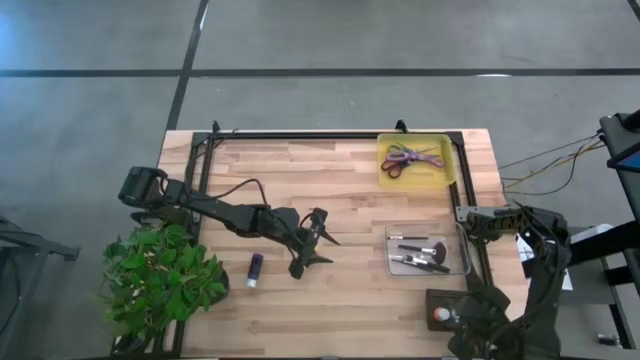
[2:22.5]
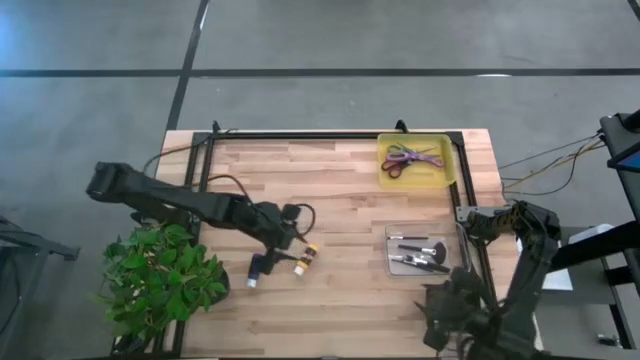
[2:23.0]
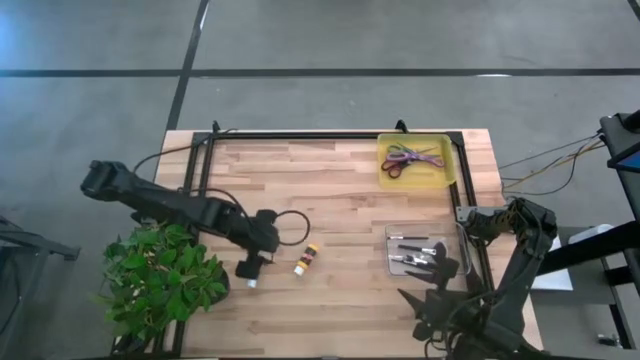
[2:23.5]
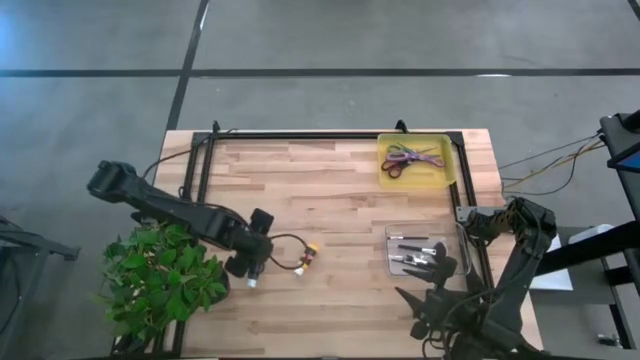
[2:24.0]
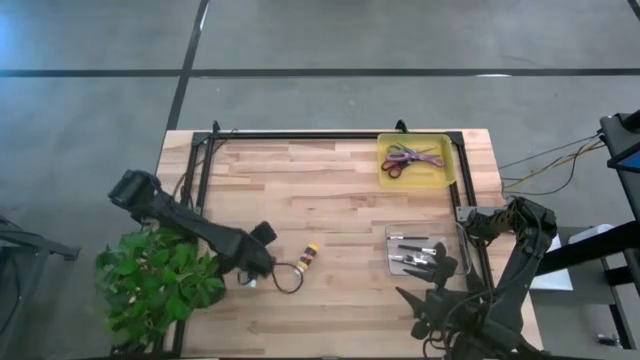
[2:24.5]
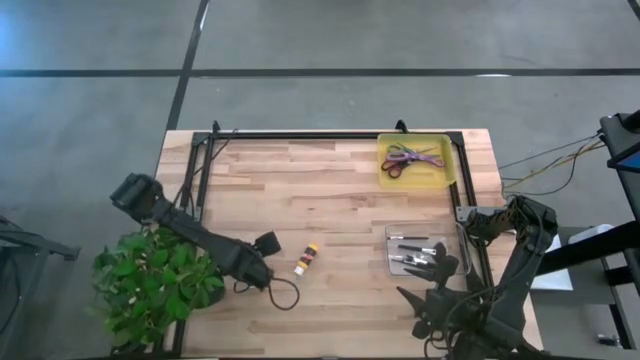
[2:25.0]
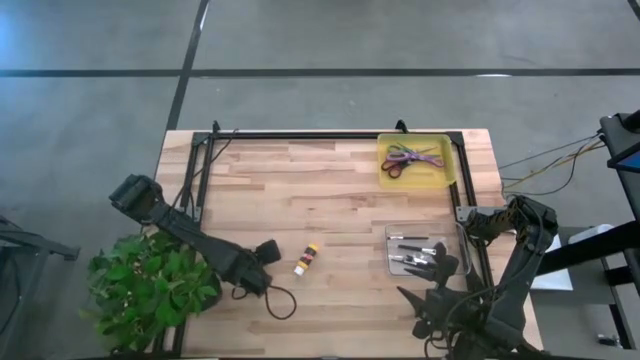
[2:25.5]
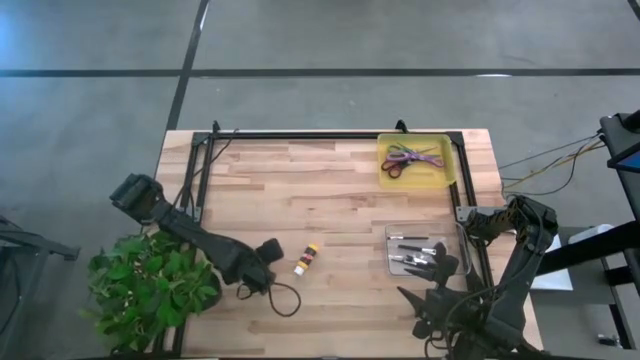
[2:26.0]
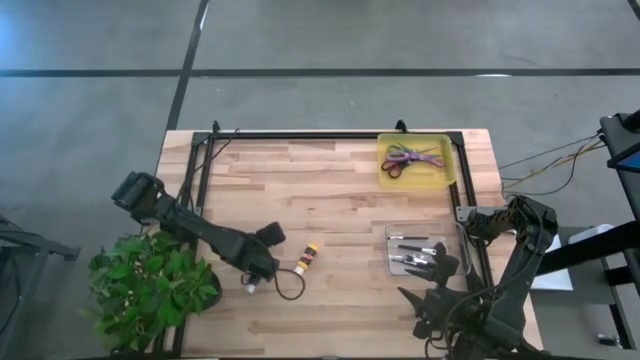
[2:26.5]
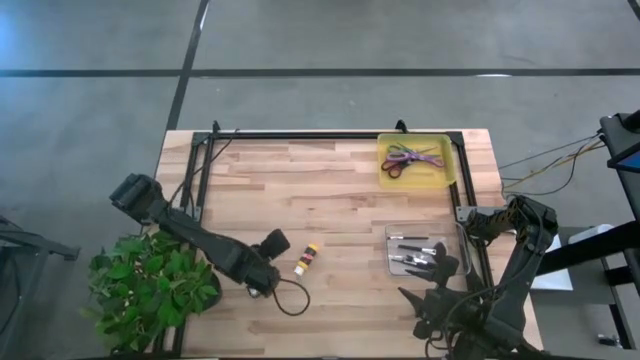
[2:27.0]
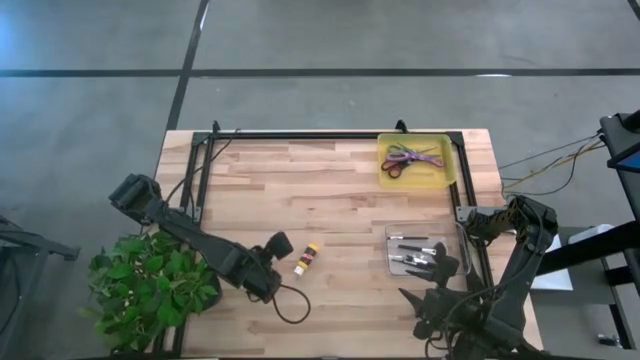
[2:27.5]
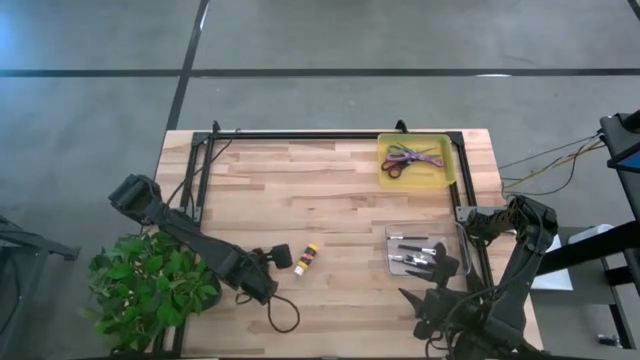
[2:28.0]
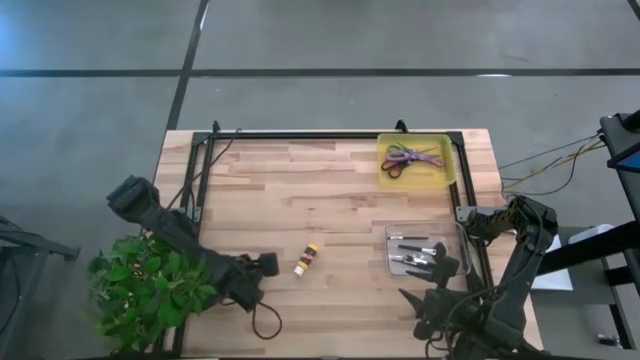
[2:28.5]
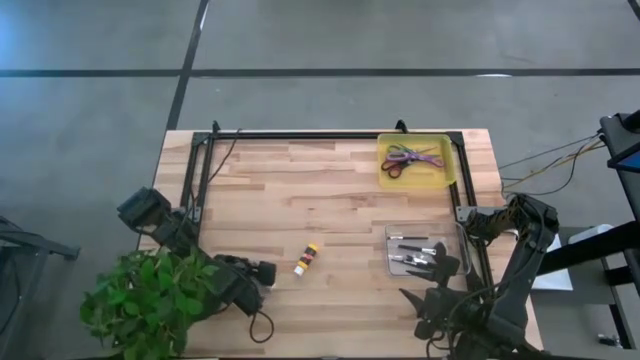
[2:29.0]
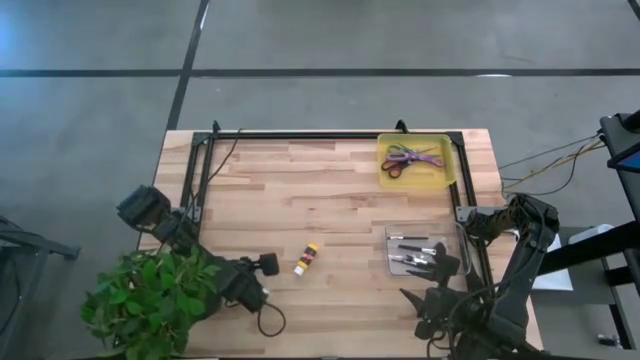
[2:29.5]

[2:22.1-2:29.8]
Task: Pick & Place Paint Supplies
Put the blue paint bottle into the black bin

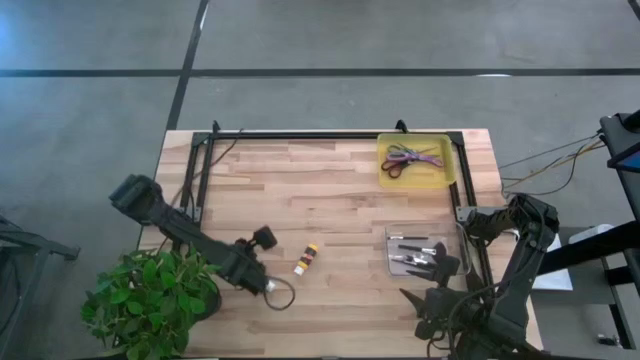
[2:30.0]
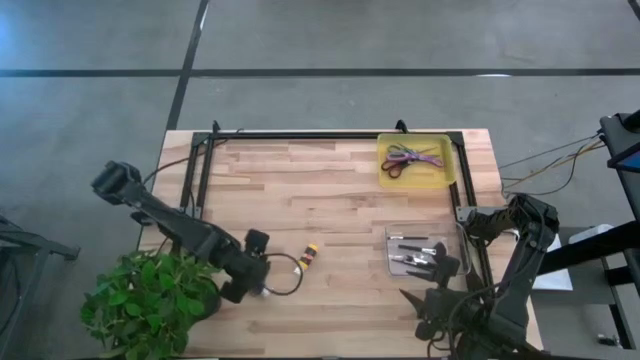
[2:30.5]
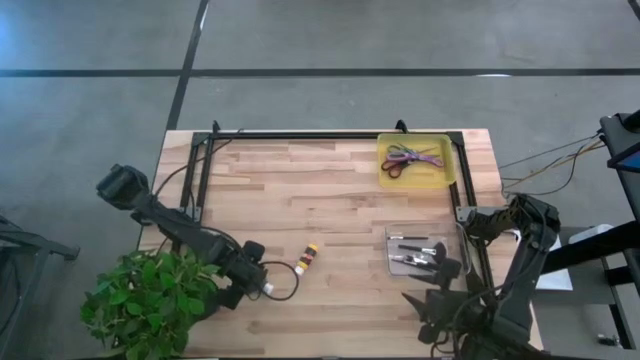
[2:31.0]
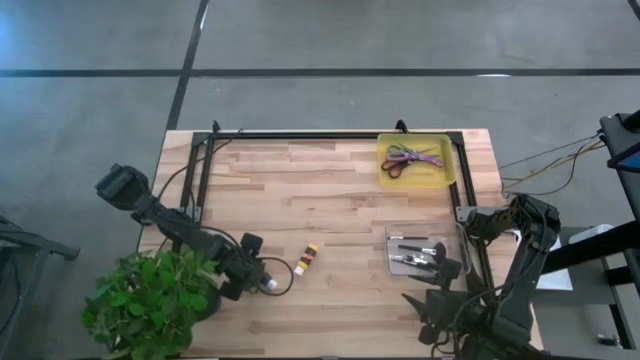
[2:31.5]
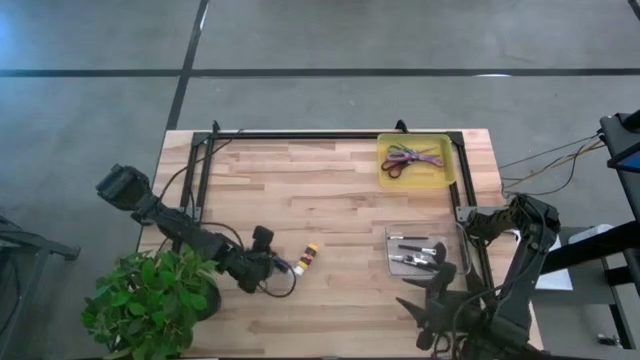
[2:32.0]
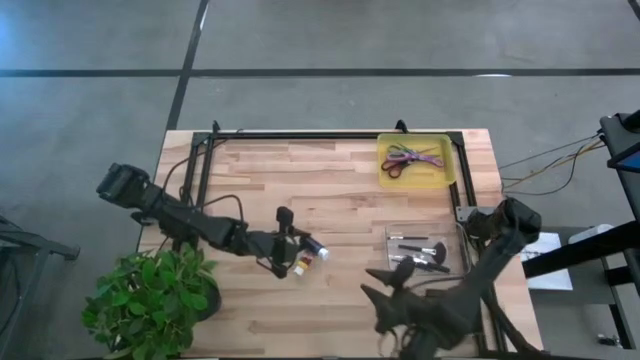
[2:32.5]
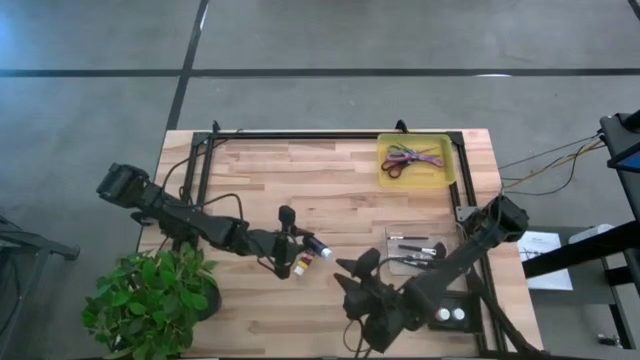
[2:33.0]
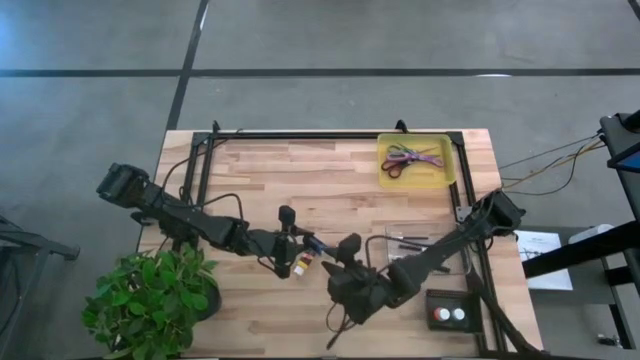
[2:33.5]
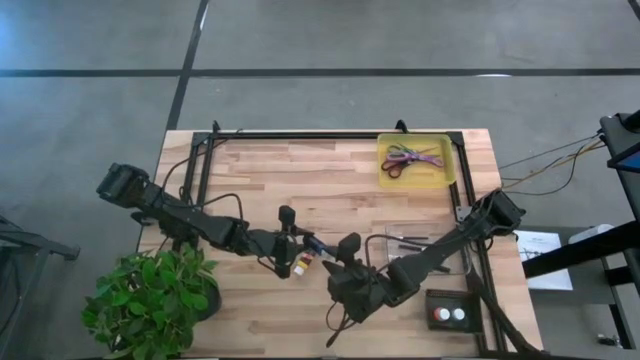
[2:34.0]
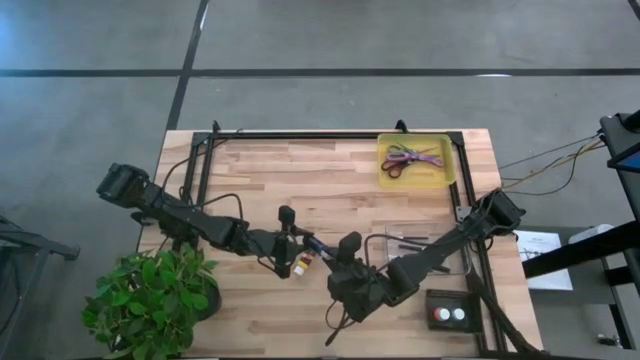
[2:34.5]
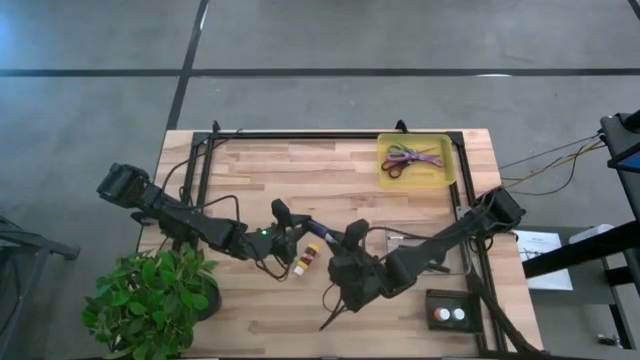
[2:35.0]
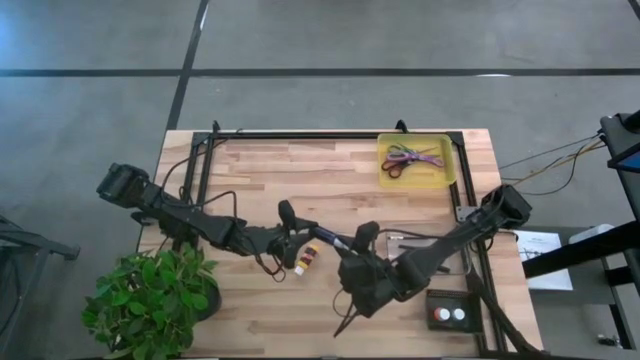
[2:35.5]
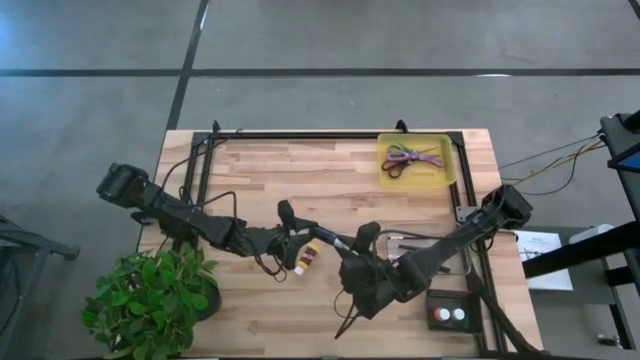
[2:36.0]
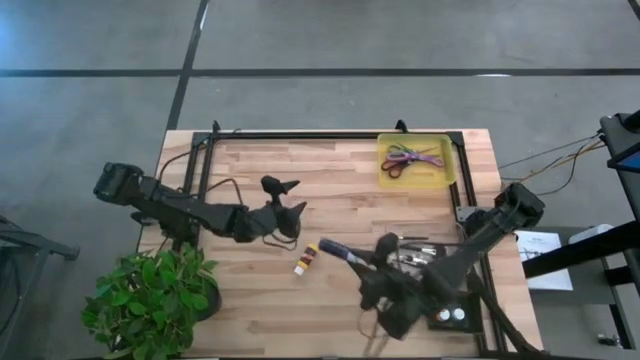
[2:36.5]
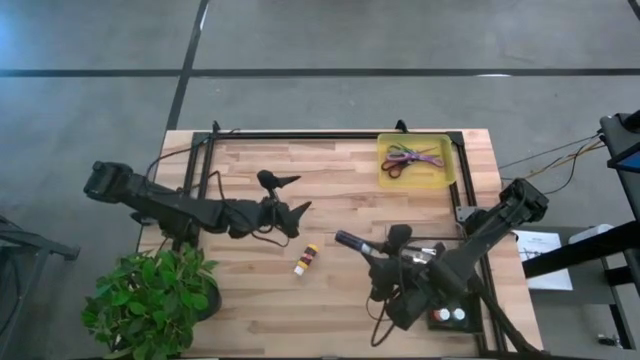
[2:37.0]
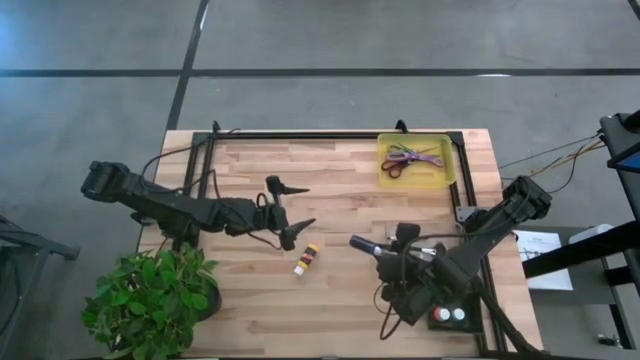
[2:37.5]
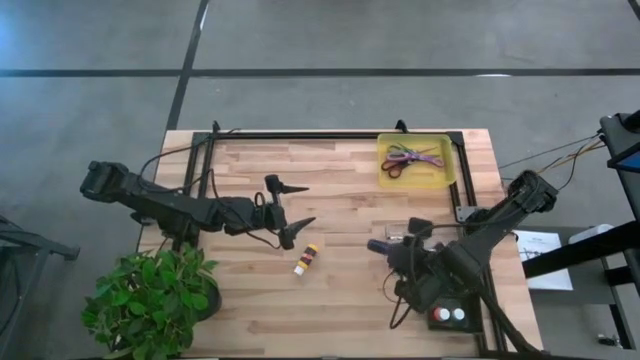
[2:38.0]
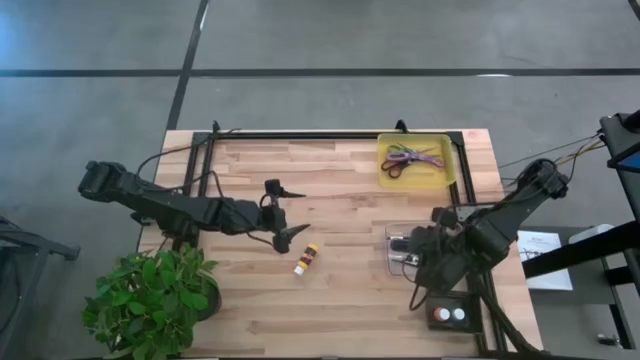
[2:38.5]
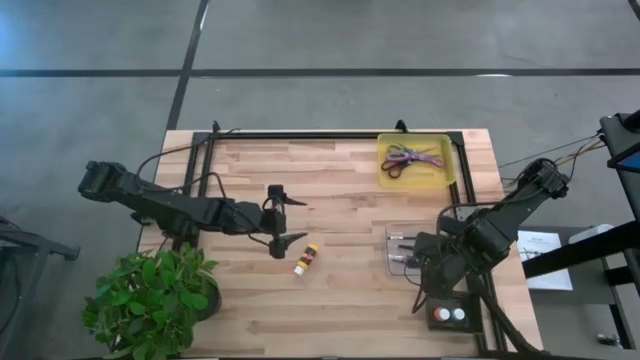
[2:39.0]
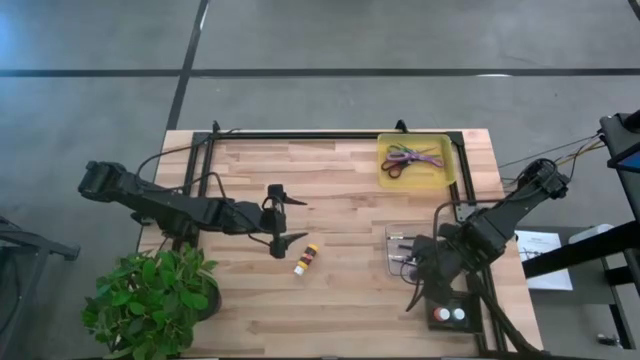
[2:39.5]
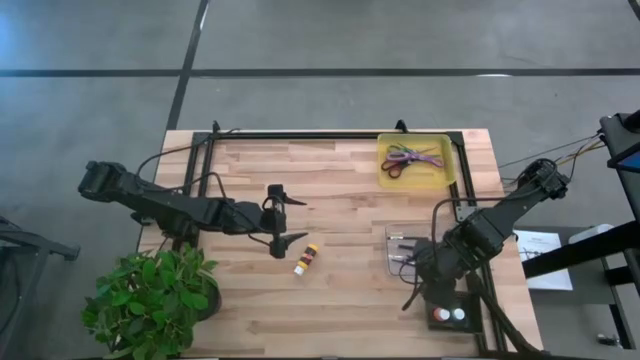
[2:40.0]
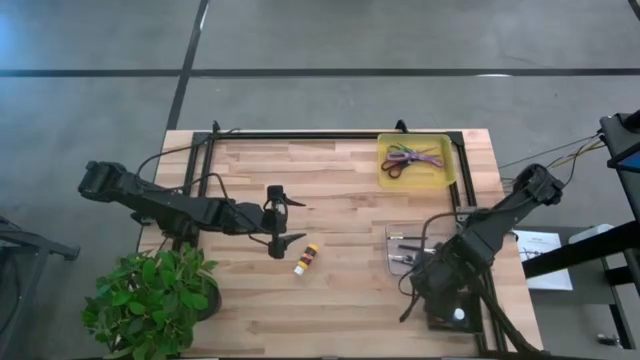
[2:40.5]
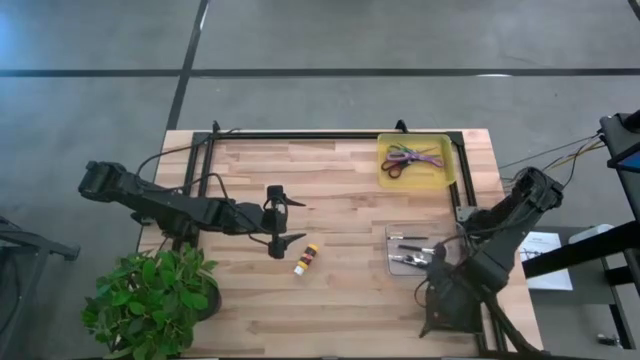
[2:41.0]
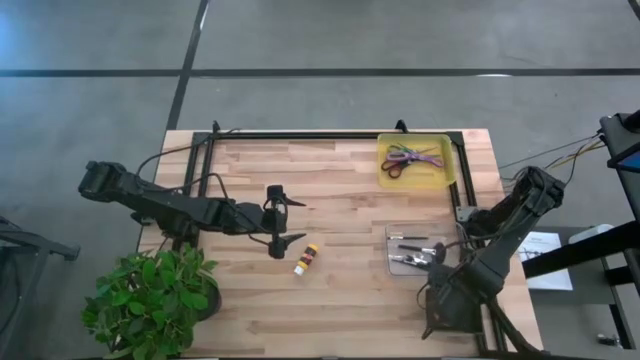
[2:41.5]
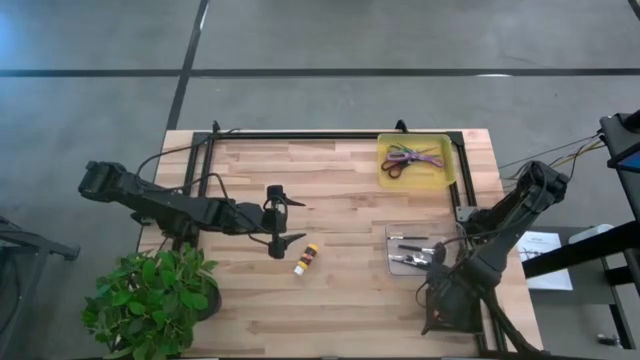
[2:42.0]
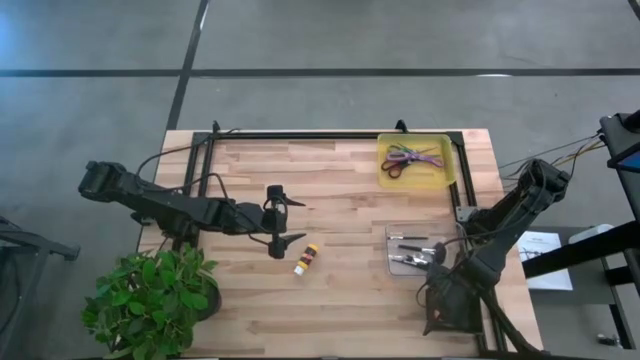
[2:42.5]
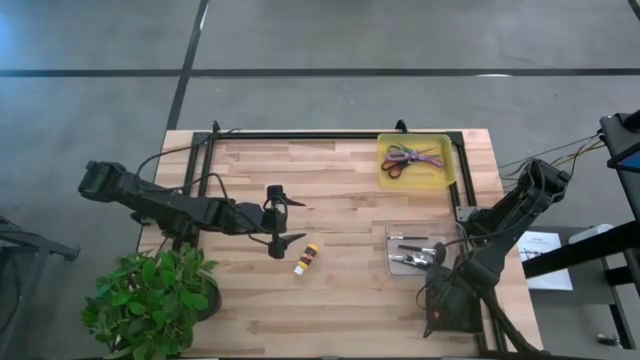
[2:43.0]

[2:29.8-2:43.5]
Put the blue paint bottle into the black bin
